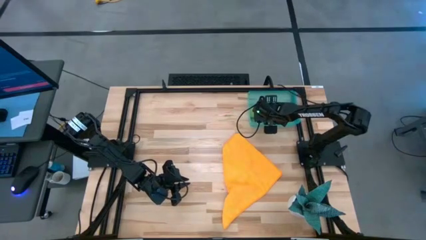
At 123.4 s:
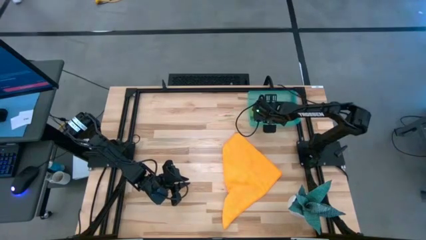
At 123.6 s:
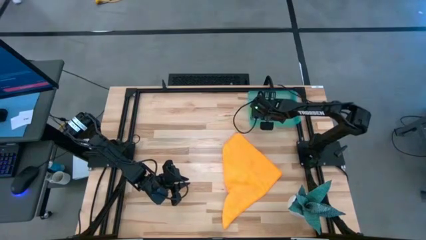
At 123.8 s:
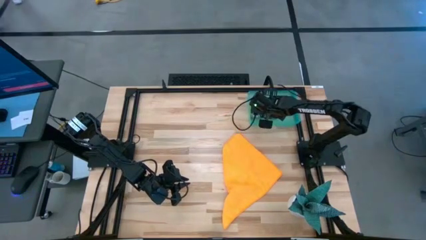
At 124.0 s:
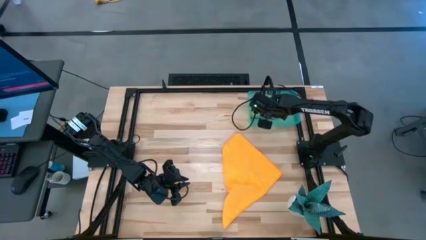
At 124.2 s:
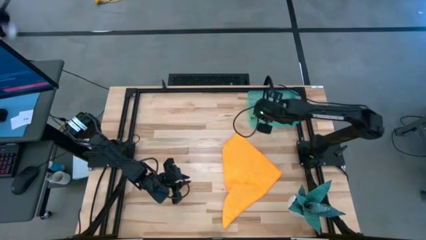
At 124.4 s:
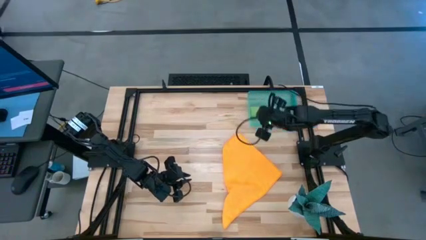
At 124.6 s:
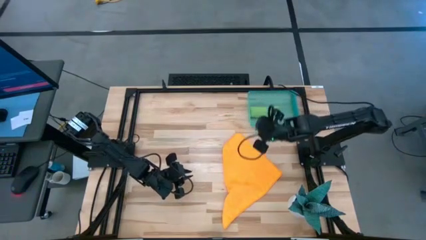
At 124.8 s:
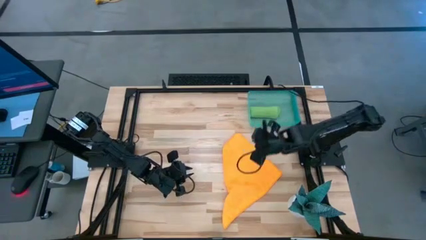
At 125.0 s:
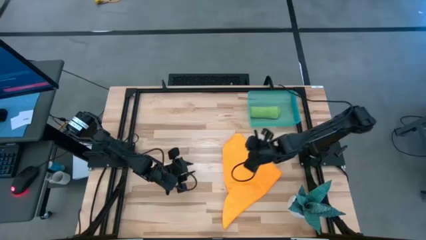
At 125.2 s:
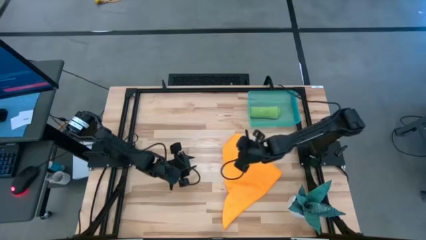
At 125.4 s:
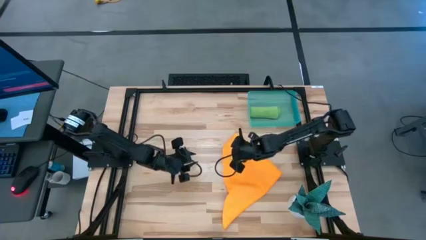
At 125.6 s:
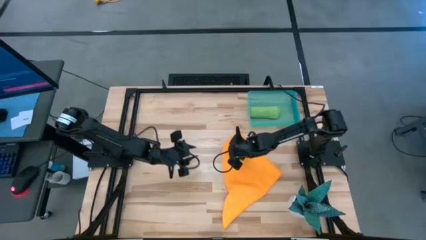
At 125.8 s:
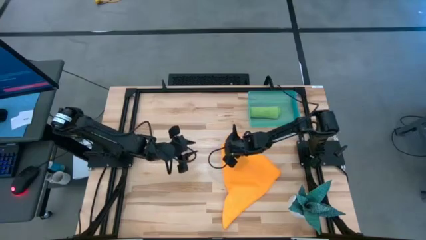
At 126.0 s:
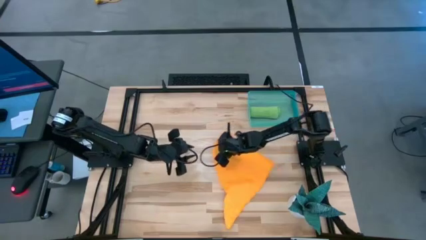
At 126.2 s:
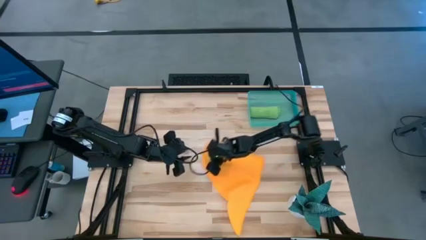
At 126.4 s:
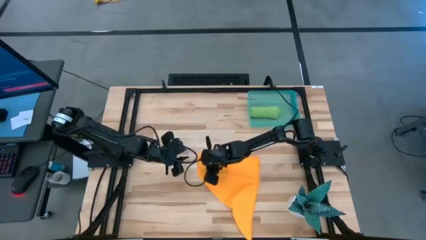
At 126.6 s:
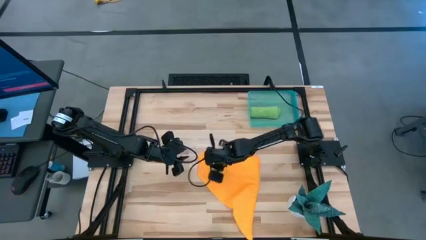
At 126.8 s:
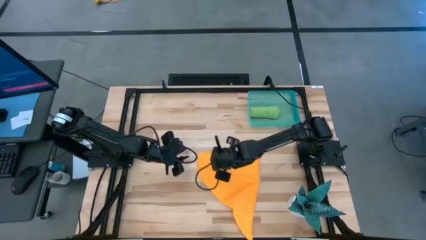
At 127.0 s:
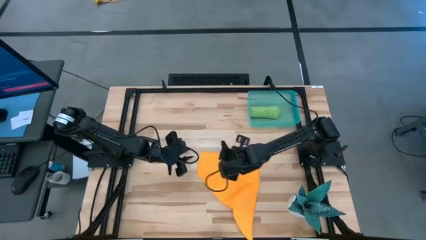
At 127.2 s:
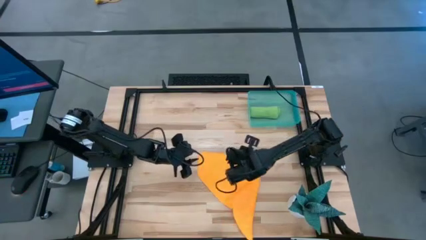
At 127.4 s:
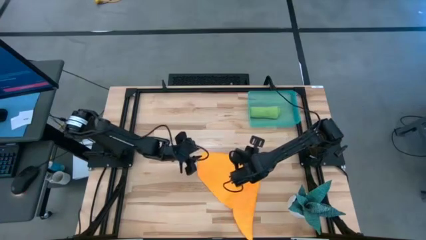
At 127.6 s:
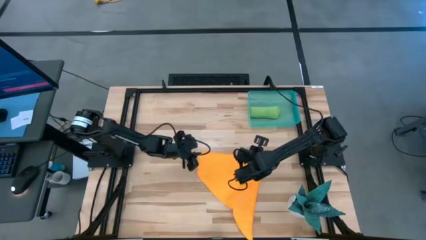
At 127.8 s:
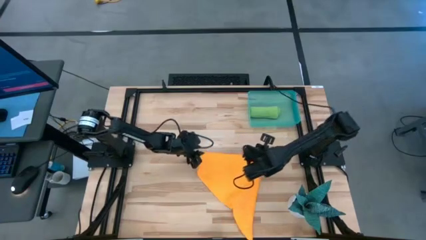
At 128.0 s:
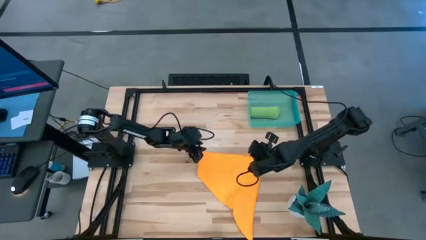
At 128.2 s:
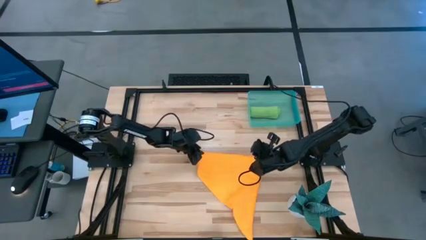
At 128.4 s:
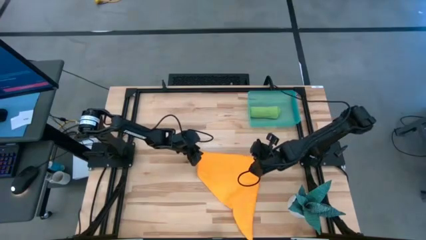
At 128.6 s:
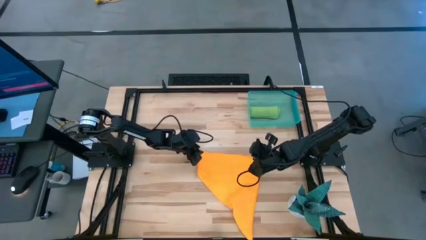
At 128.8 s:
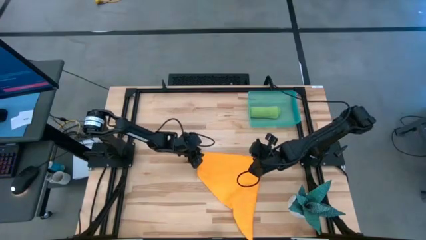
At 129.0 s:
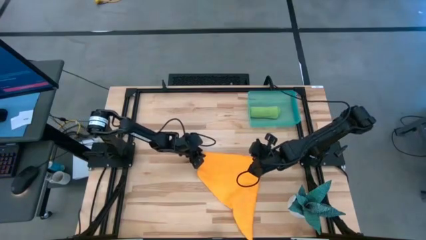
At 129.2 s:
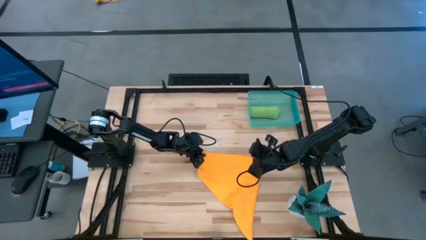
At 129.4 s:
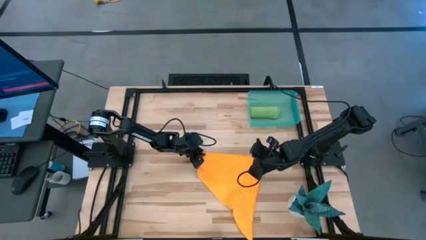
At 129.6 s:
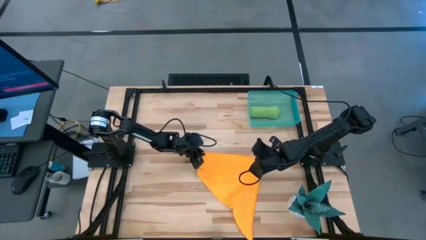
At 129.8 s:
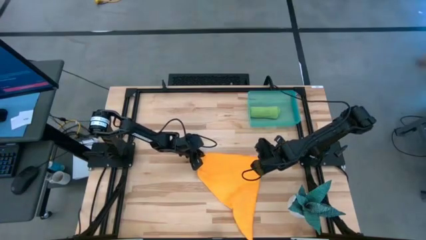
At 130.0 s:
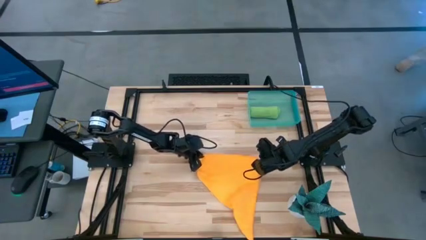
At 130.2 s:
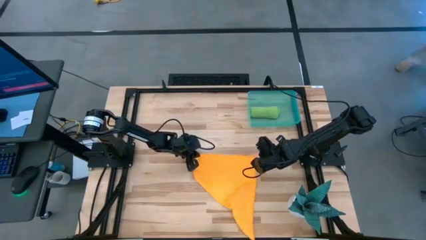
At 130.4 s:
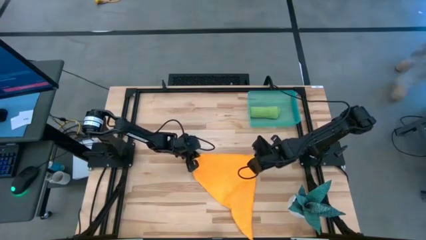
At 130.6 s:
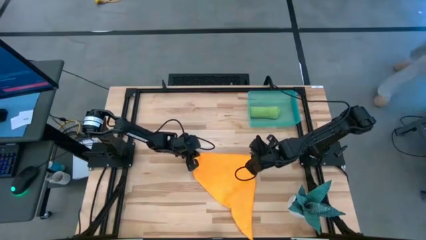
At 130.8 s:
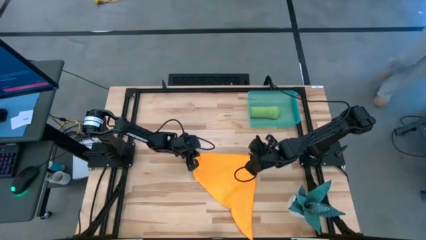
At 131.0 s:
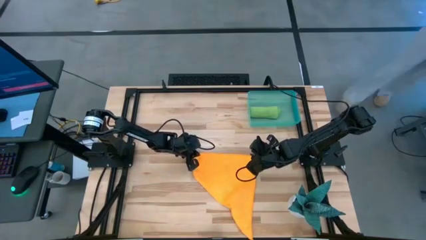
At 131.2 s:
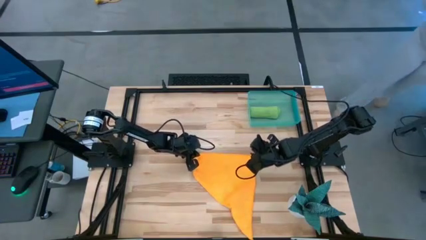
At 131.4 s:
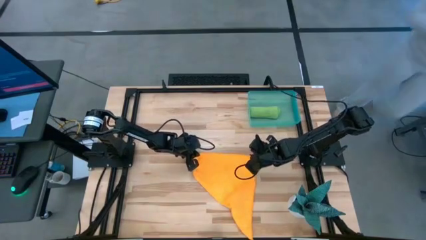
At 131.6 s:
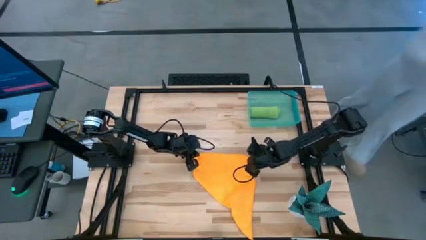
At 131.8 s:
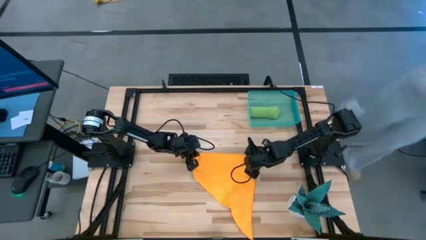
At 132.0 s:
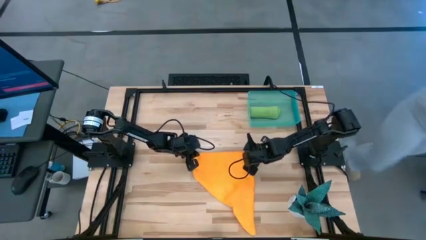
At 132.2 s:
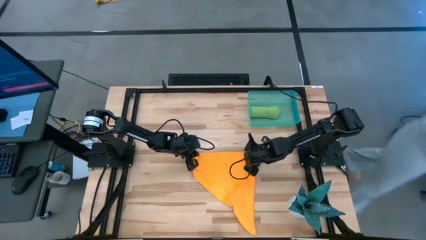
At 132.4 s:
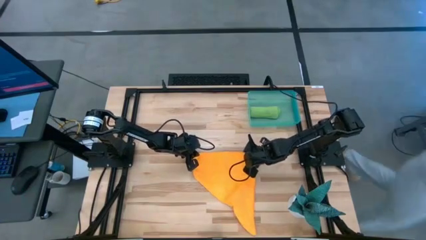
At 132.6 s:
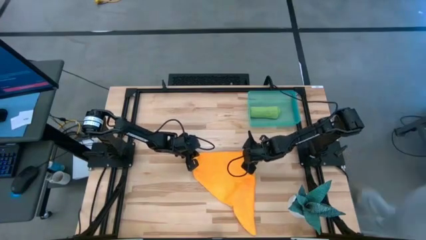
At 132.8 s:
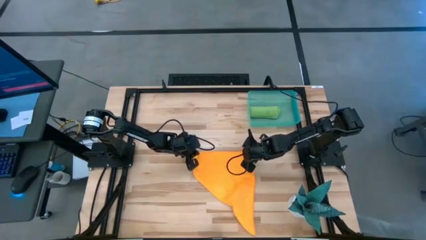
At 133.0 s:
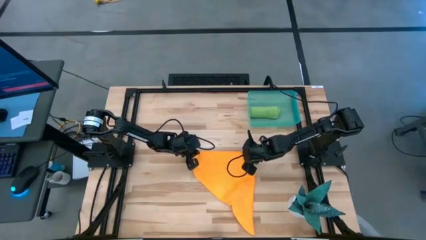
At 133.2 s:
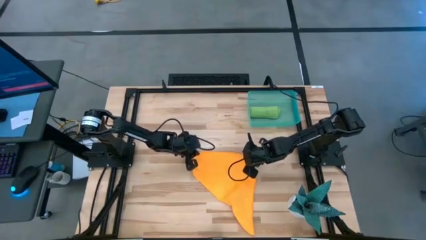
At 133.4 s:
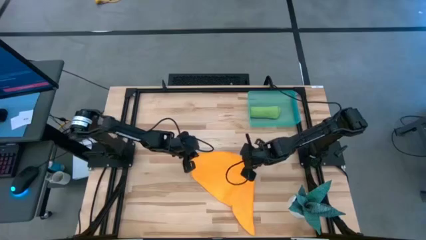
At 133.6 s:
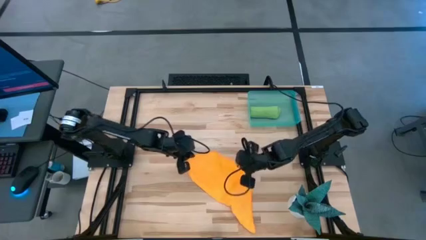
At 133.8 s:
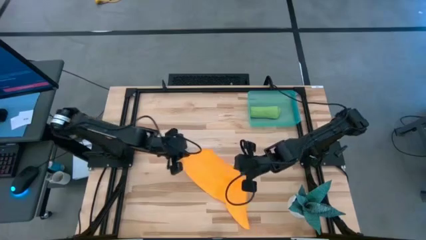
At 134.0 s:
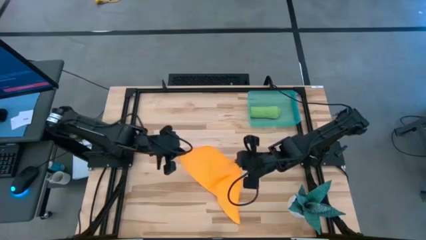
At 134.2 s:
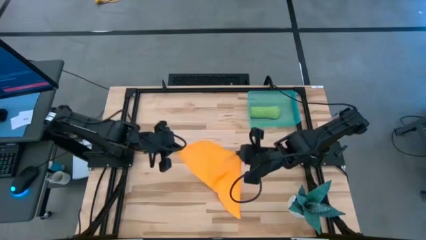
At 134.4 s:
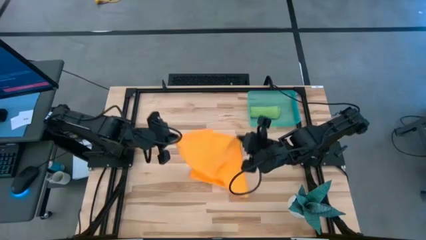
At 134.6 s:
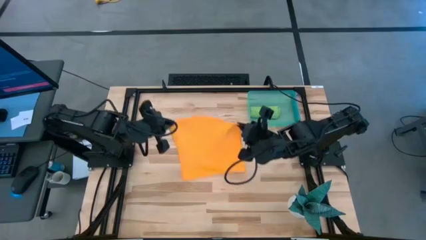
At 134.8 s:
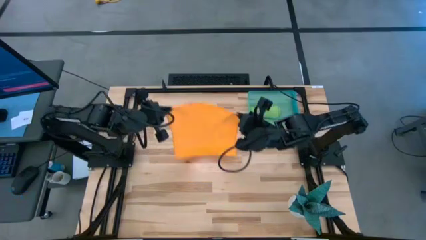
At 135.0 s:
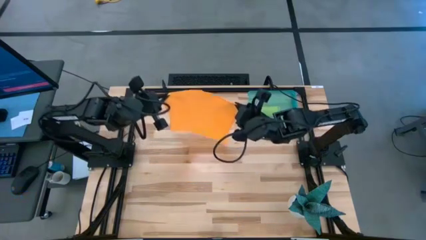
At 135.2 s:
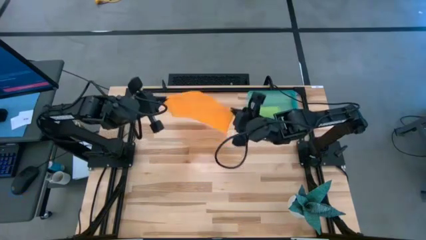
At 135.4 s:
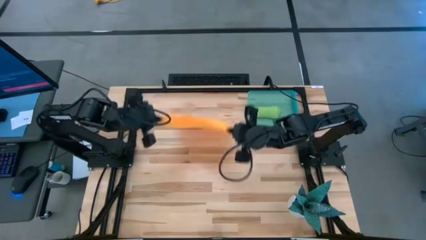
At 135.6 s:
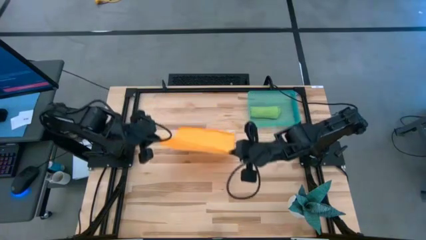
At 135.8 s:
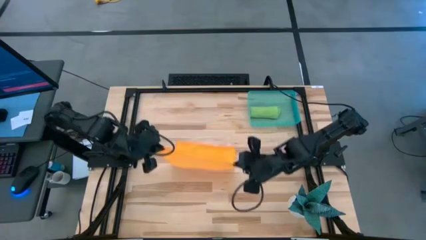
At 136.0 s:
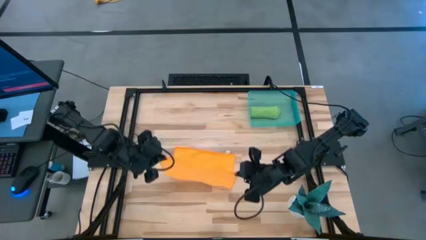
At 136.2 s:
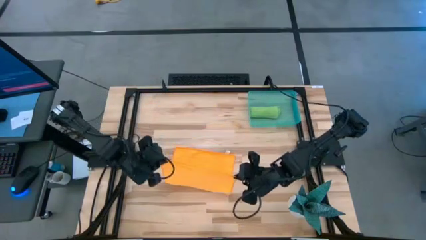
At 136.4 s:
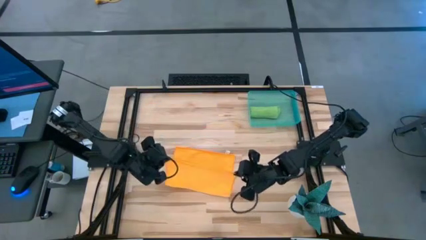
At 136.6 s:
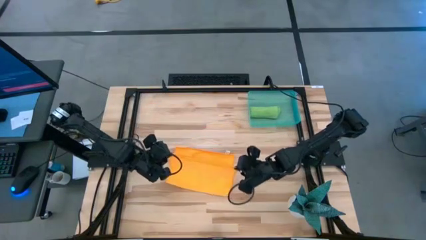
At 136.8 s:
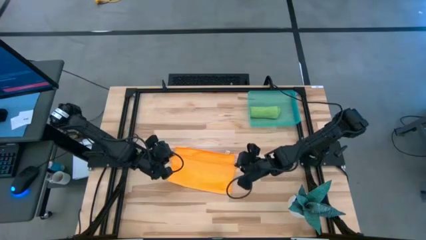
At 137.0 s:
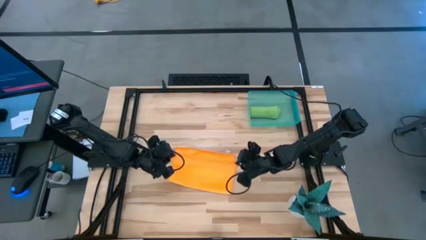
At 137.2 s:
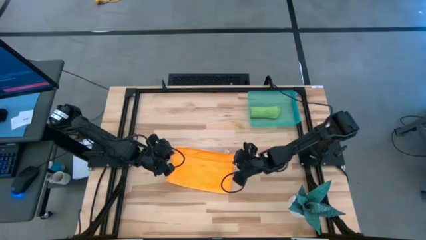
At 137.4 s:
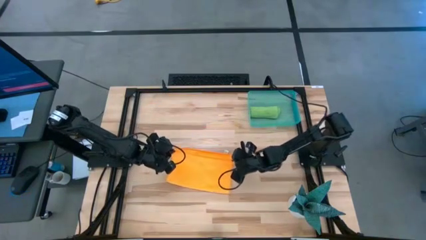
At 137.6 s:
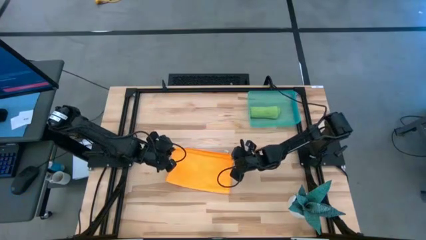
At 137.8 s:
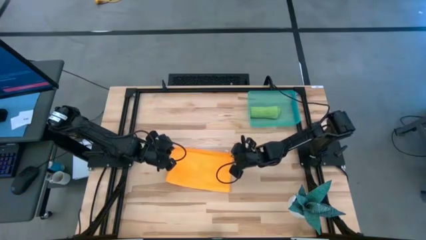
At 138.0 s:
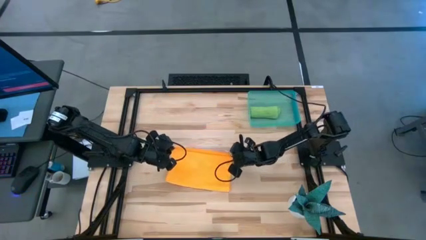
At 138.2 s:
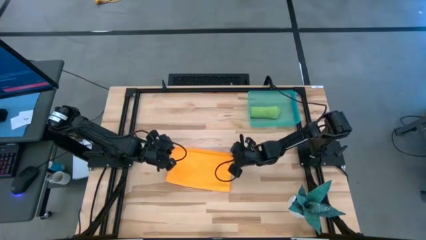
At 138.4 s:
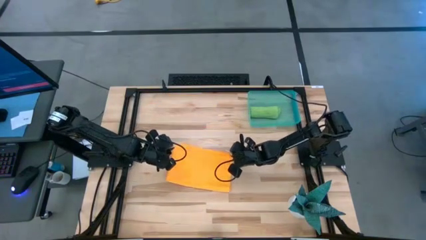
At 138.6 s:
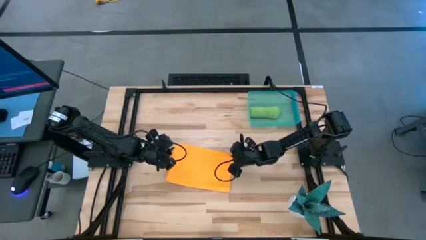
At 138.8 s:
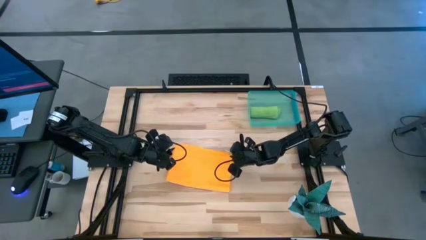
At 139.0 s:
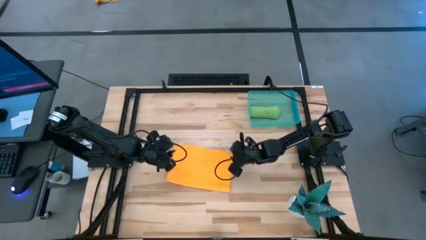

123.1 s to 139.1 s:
Task: Roll microfiber towels into tight, uniform cylinder then place into a basket
Fold the orange microfiber towel
